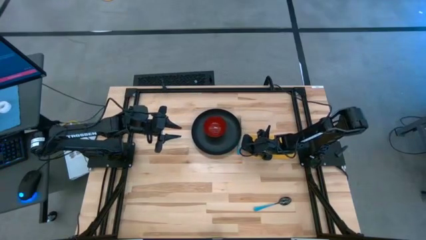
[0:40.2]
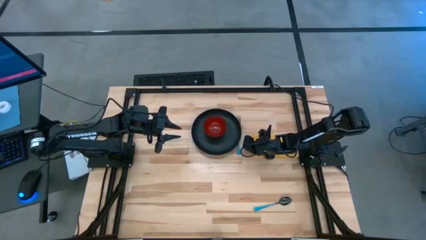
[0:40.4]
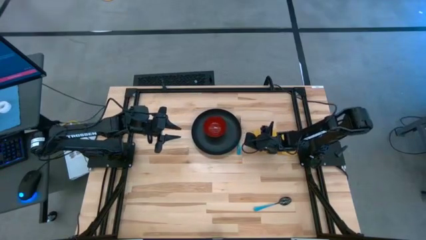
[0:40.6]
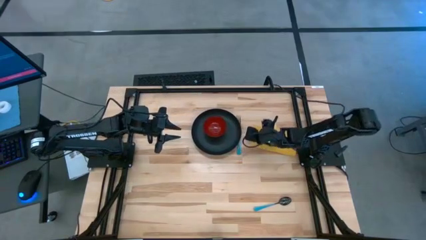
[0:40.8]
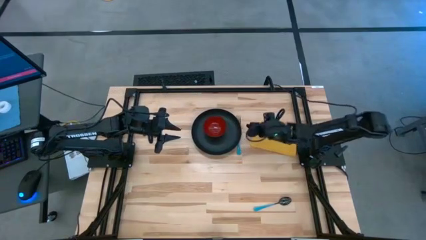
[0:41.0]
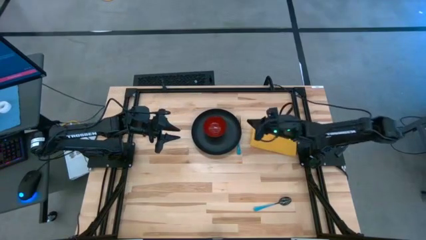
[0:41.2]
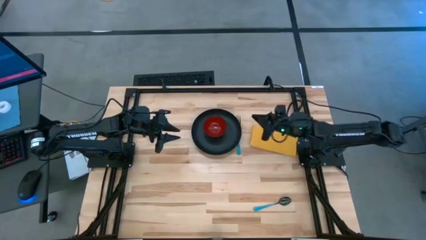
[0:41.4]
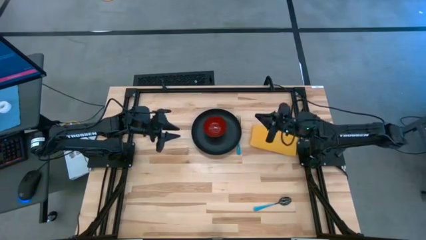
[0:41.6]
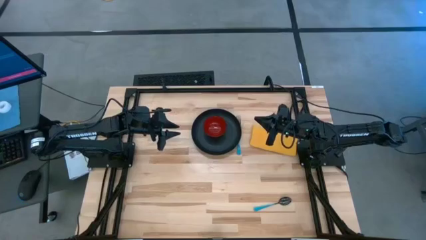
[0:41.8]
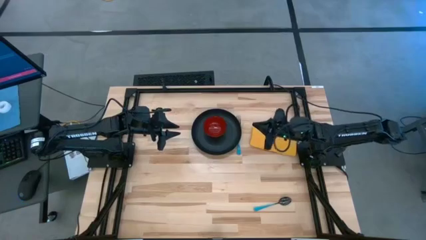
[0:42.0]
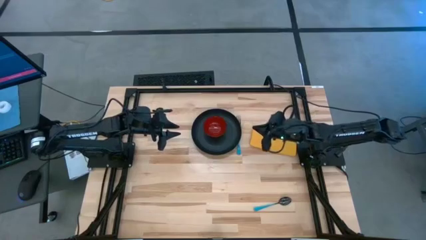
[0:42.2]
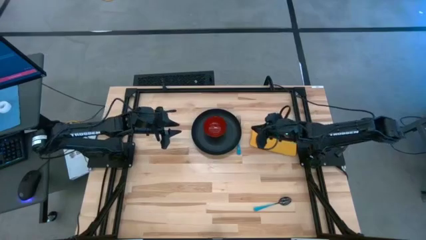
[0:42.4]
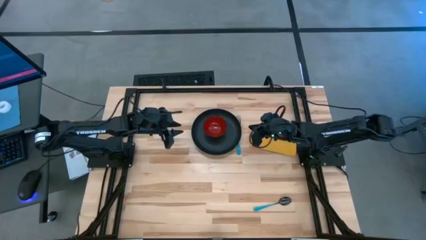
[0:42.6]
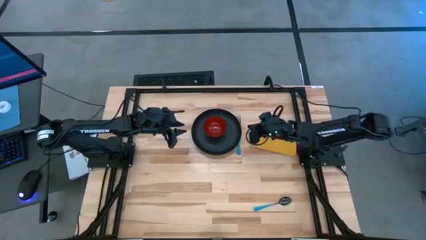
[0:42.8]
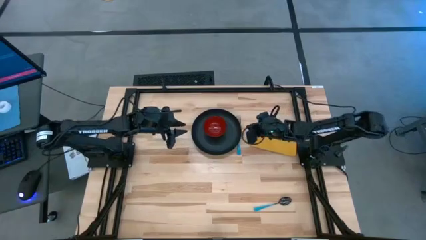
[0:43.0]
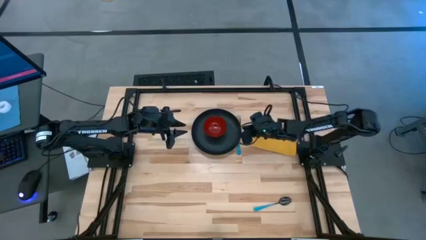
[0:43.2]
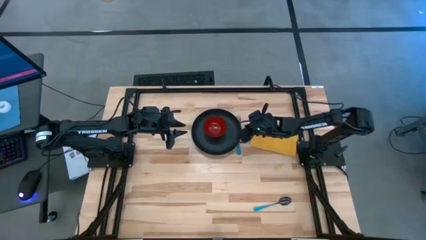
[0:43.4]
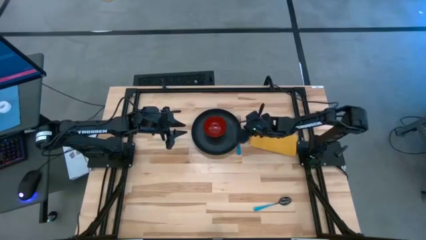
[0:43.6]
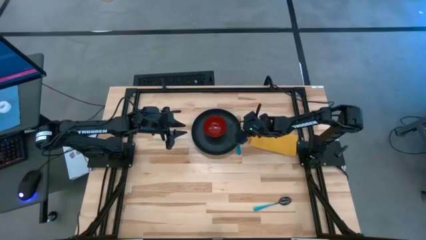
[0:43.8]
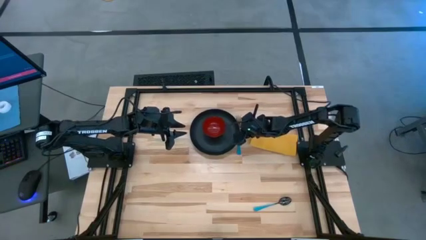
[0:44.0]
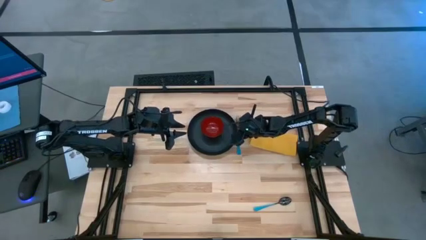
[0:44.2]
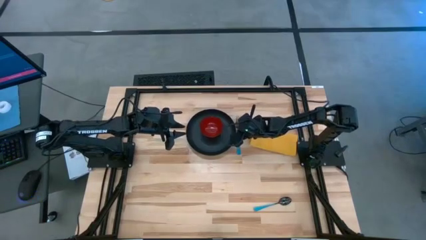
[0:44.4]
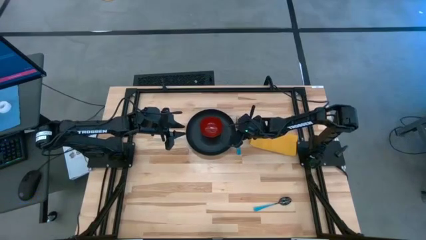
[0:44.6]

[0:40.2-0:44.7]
Task: Set table place
Adjust the black plate

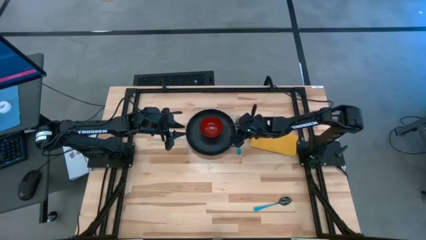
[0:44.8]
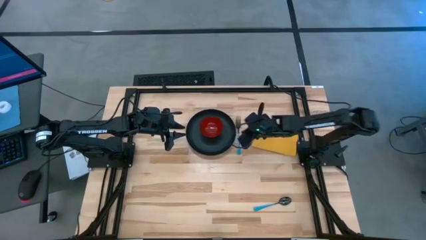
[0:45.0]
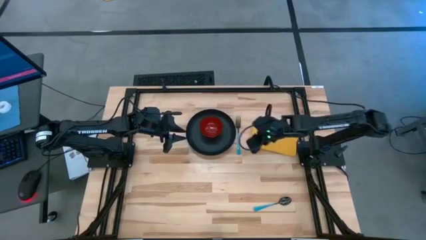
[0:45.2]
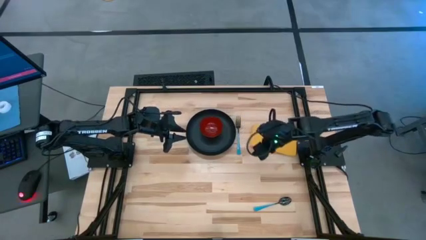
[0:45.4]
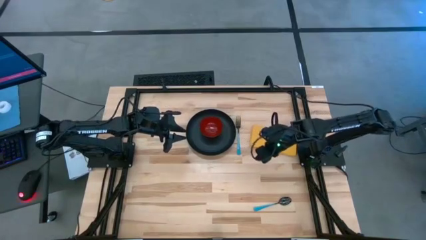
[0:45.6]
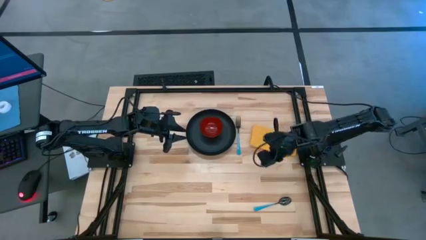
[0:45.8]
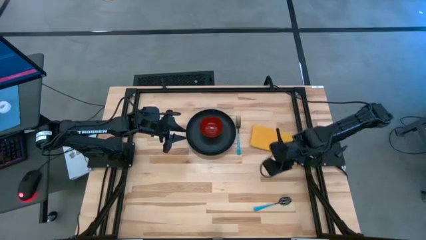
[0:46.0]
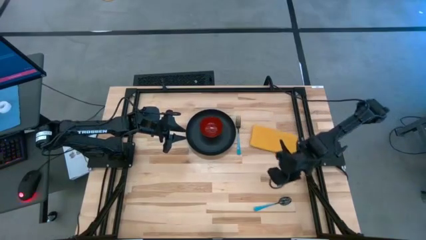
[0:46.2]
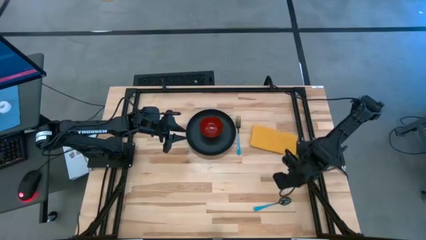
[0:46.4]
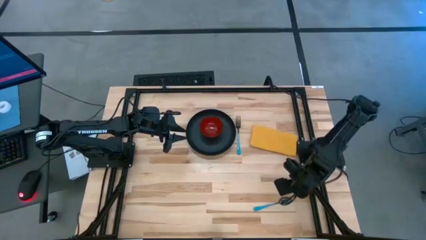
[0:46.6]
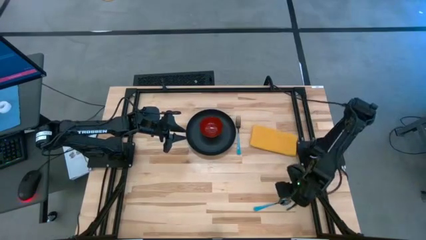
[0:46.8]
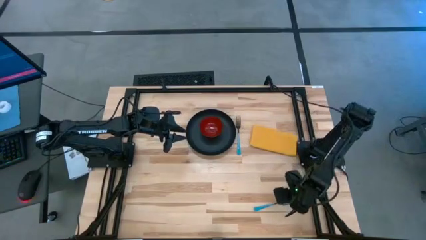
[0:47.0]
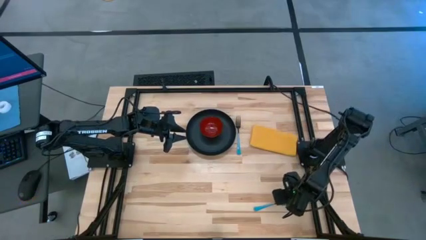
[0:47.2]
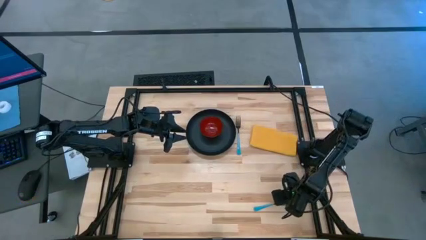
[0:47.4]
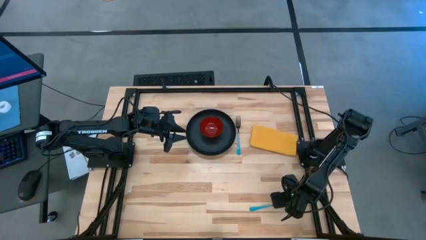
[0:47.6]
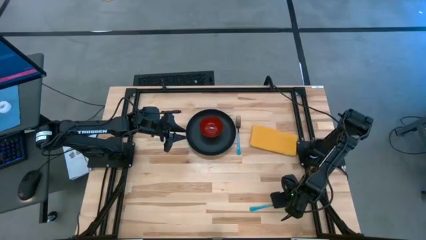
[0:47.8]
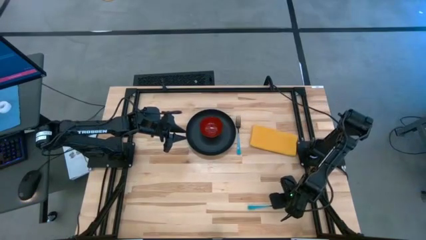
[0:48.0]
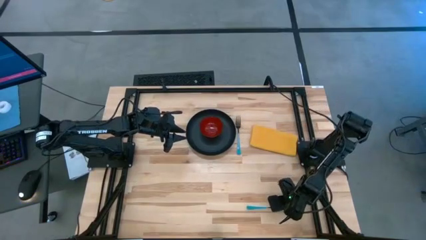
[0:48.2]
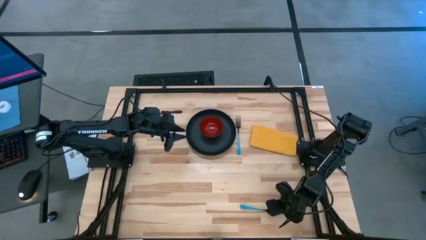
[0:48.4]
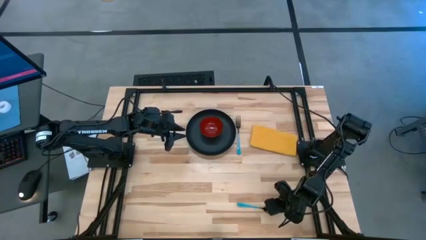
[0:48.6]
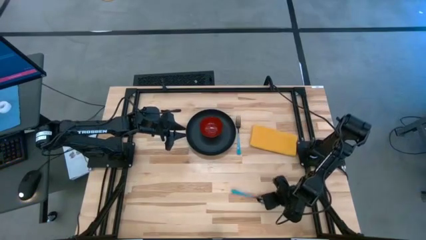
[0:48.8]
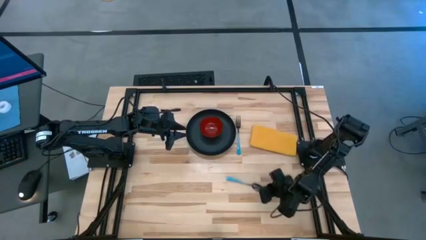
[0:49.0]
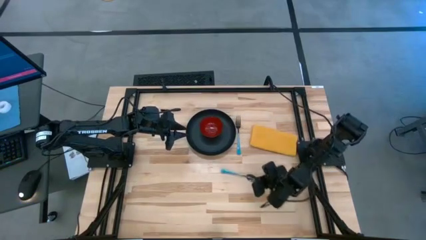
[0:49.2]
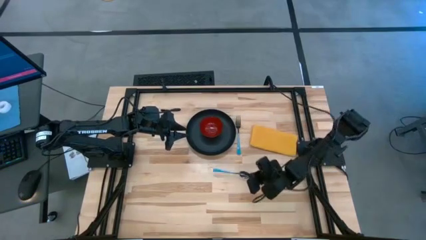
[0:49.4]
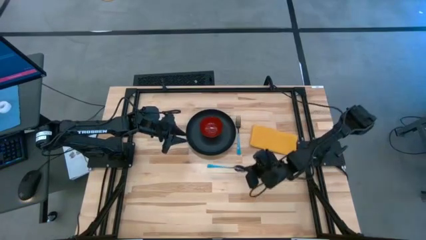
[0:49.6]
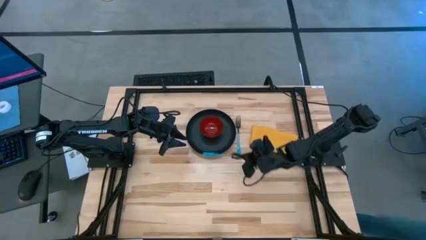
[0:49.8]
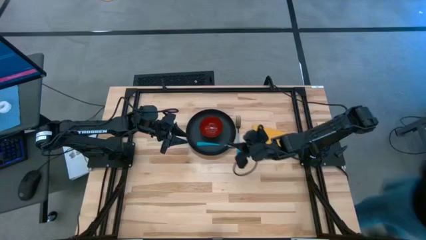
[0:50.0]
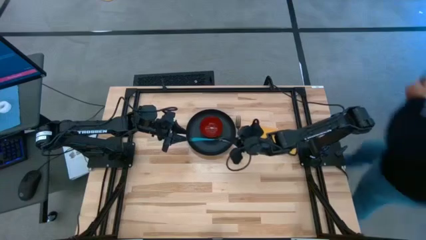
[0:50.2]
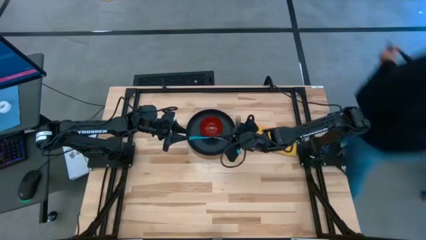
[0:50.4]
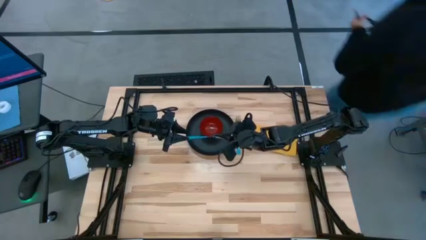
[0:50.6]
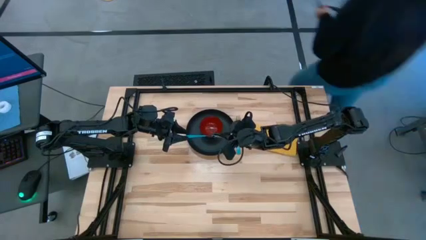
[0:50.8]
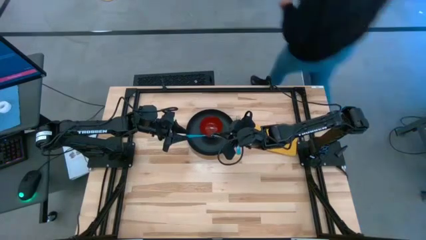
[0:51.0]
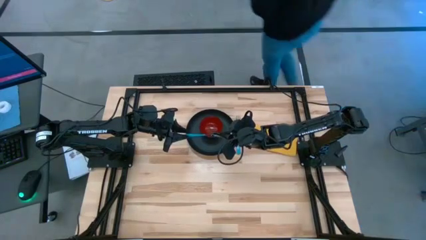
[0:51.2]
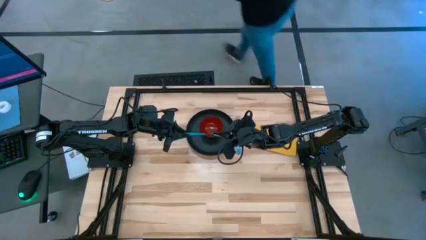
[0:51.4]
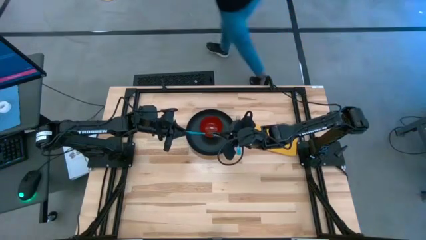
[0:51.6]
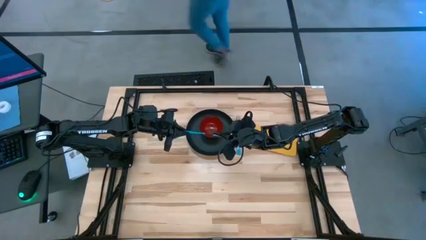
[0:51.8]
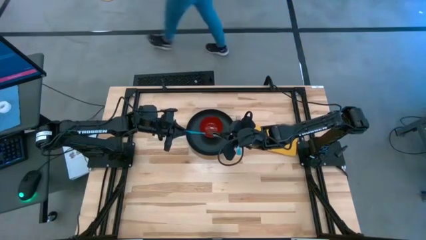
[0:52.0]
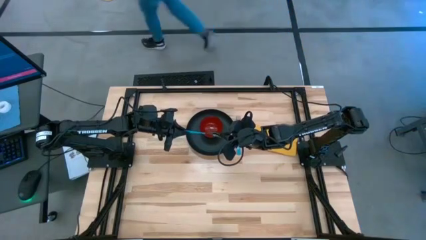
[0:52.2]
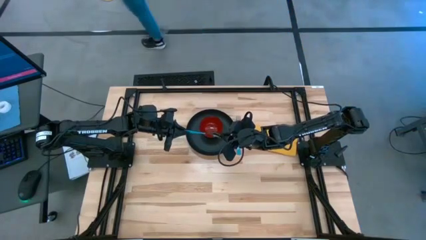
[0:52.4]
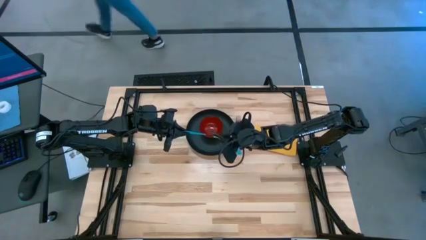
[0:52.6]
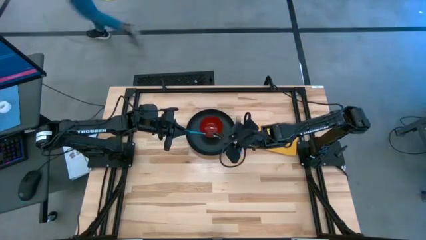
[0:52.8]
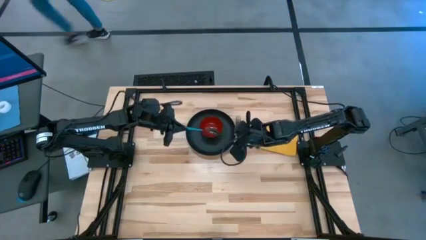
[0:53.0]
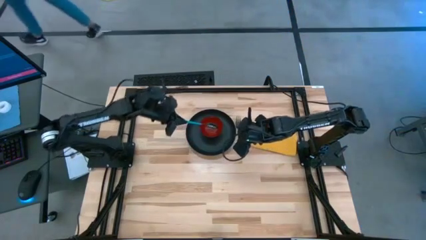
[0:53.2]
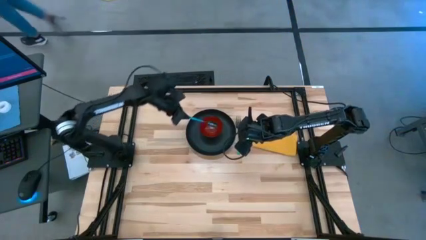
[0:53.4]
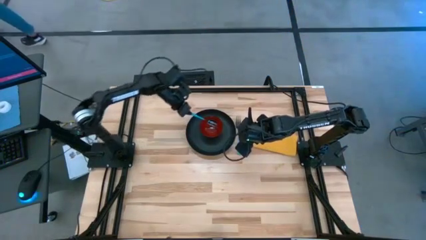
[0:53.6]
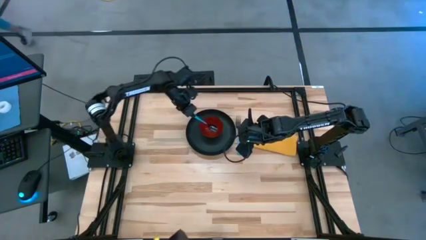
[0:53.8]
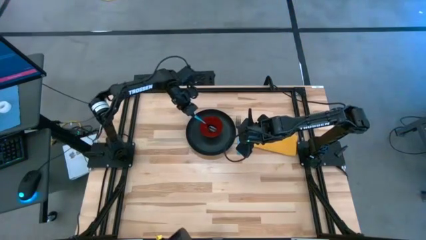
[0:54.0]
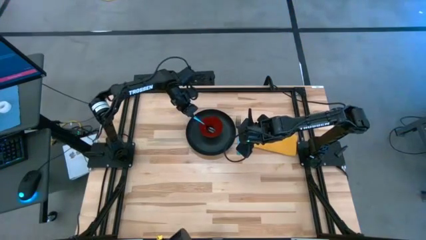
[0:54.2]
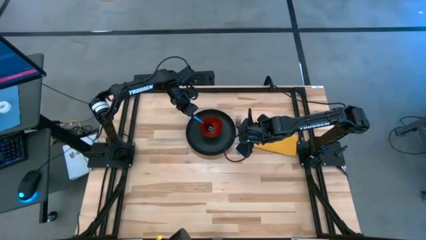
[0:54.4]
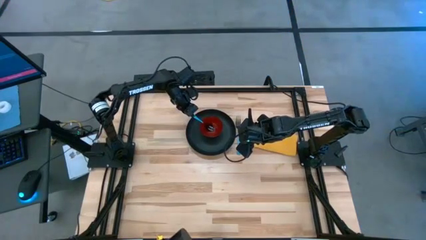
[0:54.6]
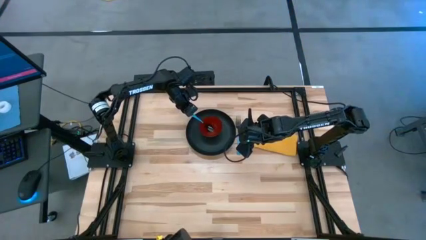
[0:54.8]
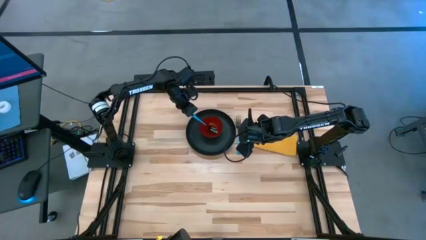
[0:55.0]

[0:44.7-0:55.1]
Put the blue spoon on the red bowl
